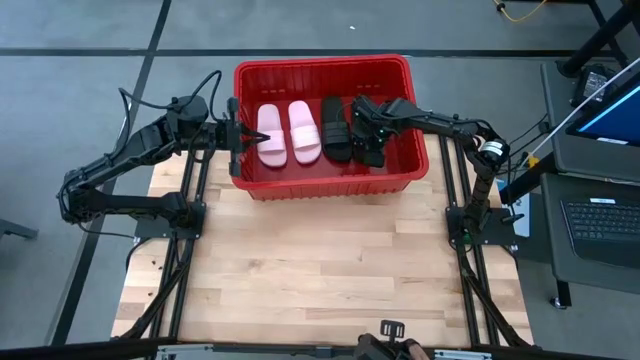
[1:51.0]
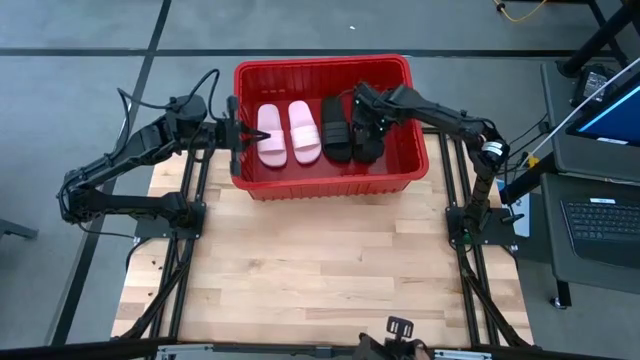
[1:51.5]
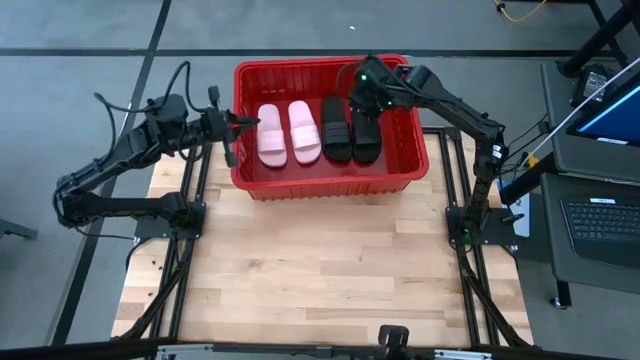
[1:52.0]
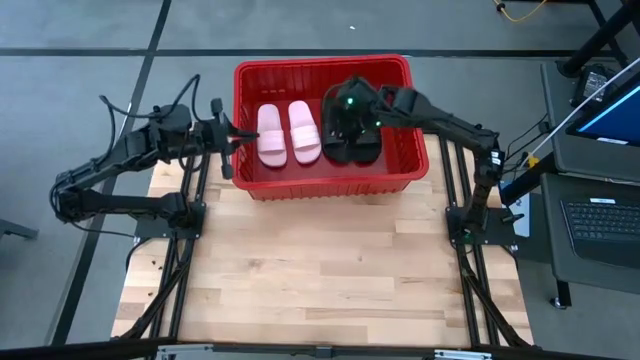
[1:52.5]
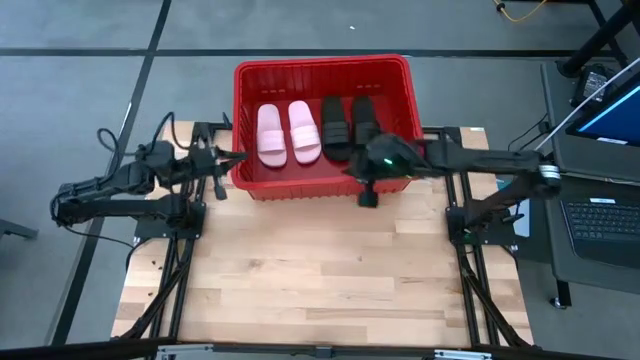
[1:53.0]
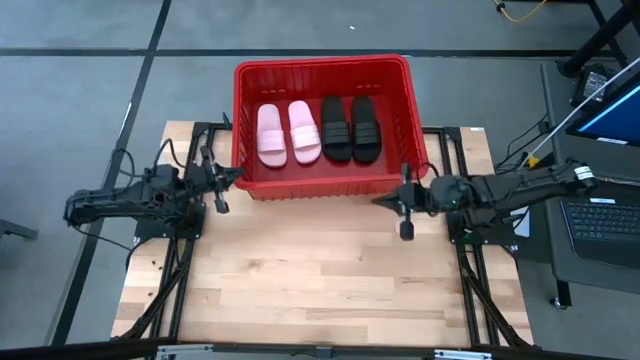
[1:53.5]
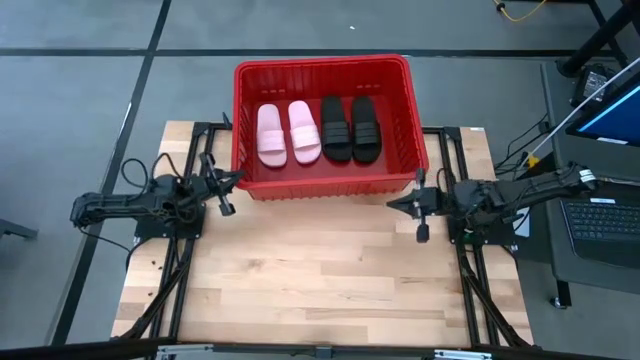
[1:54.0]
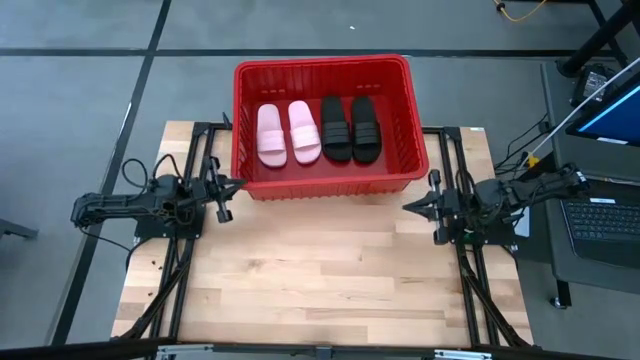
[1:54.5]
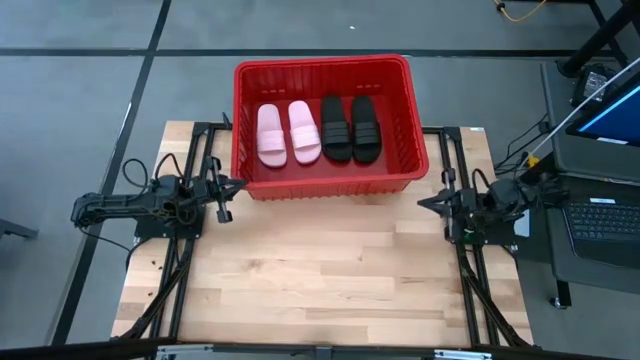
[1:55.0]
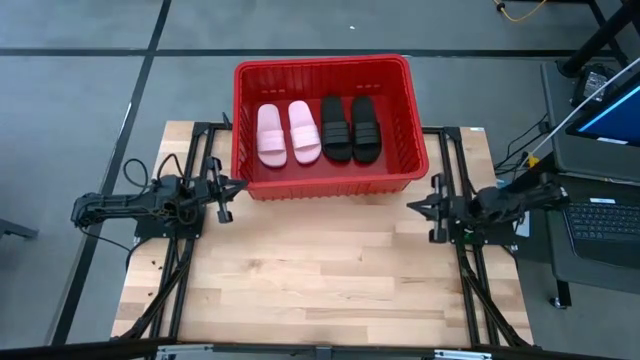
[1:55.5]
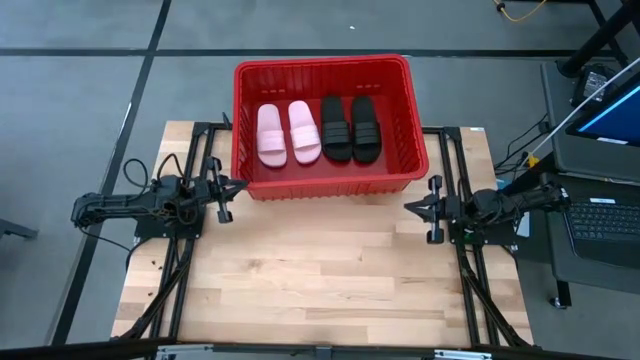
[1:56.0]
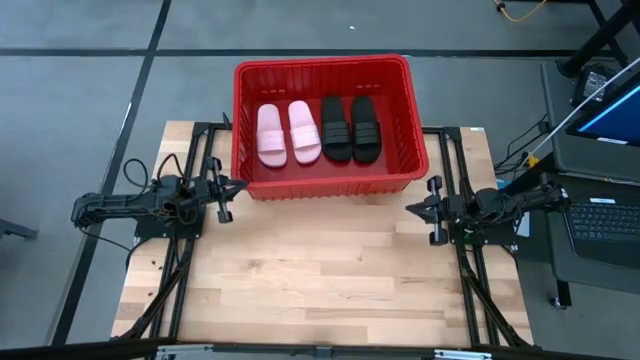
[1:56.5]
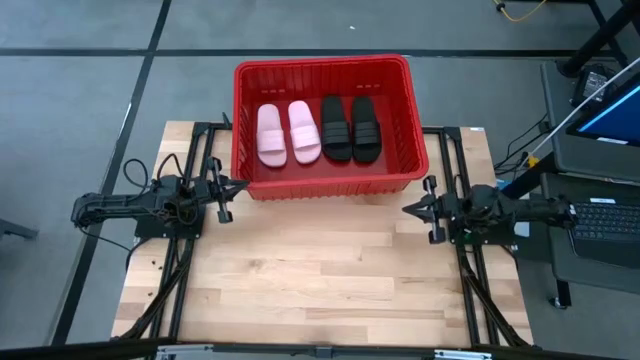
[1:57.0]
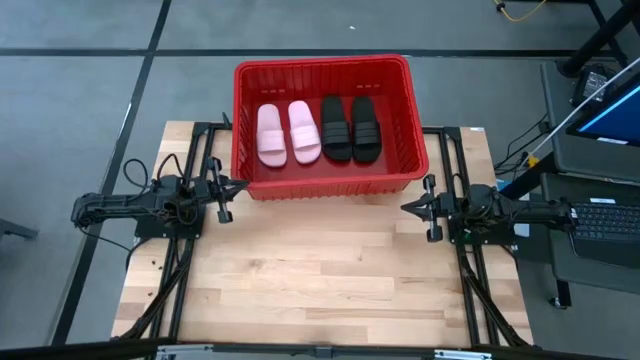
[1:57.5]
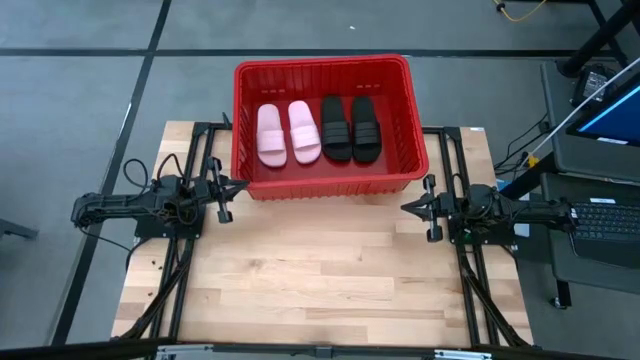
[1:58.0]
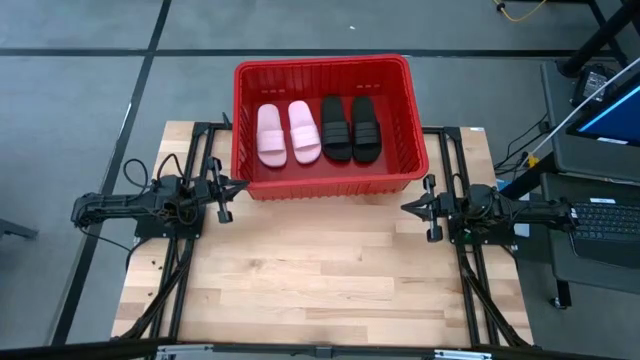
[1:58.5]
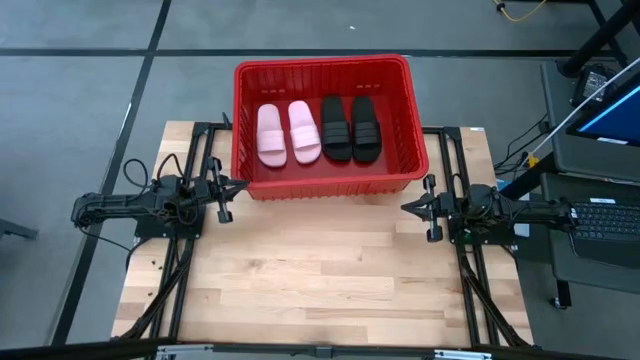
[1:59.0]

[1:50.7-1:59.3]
Task: Pick and place slides into bin
Return to Home Position

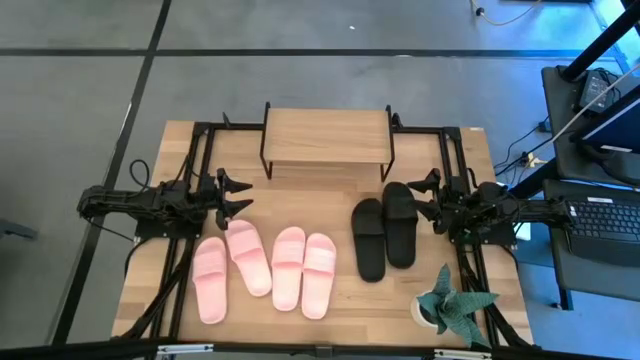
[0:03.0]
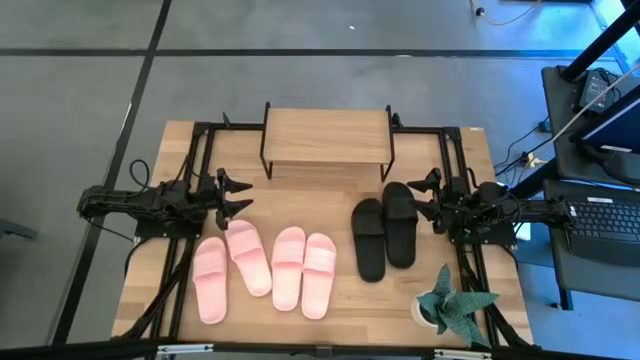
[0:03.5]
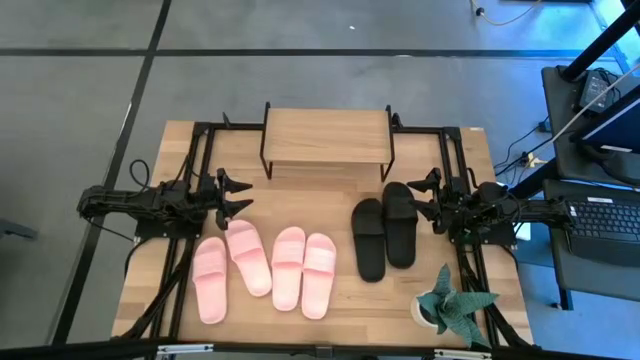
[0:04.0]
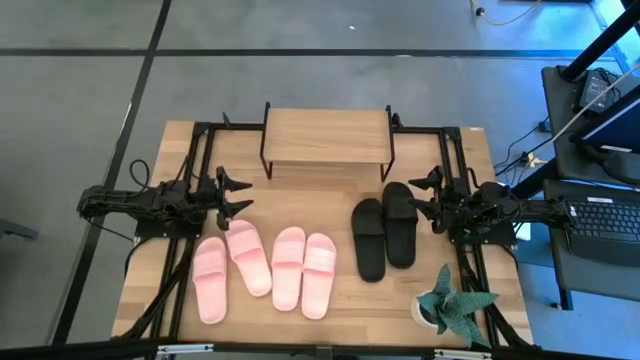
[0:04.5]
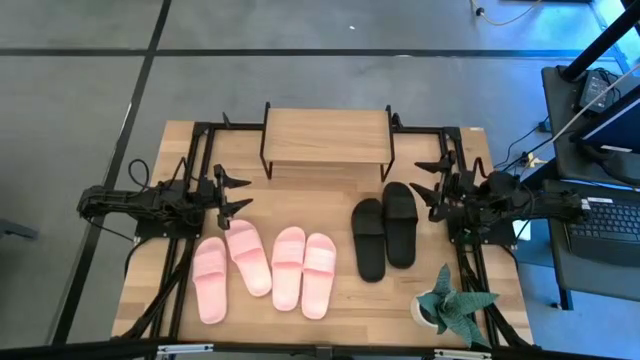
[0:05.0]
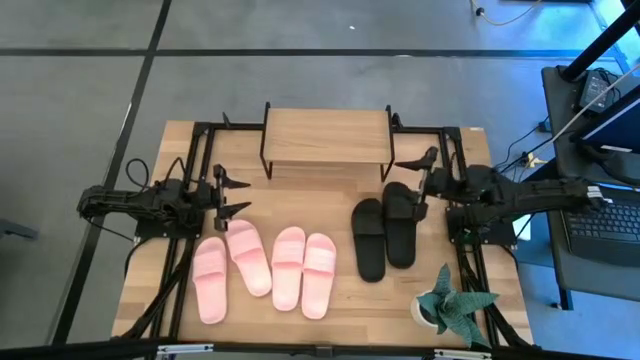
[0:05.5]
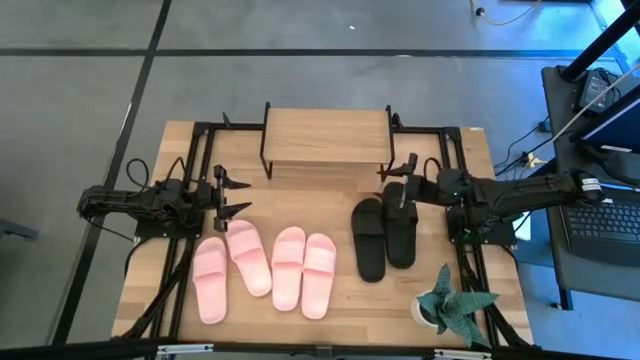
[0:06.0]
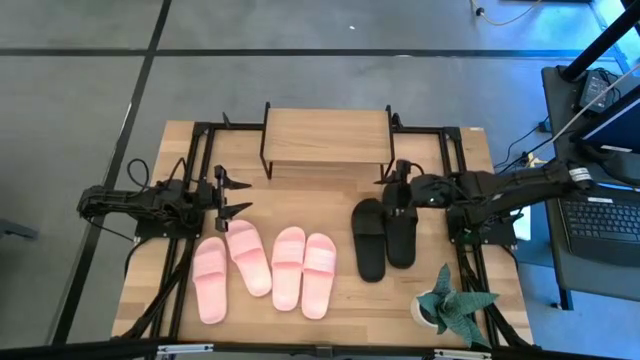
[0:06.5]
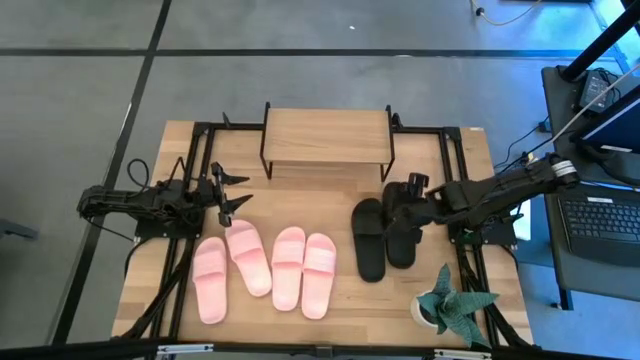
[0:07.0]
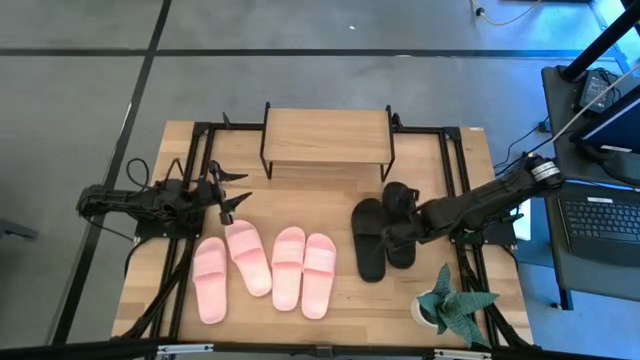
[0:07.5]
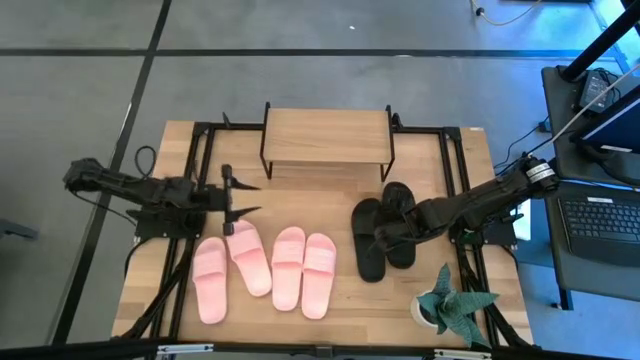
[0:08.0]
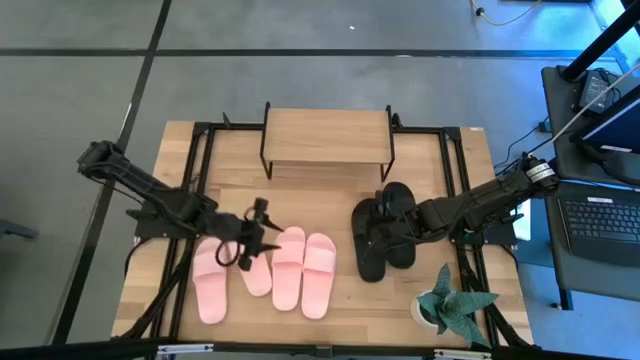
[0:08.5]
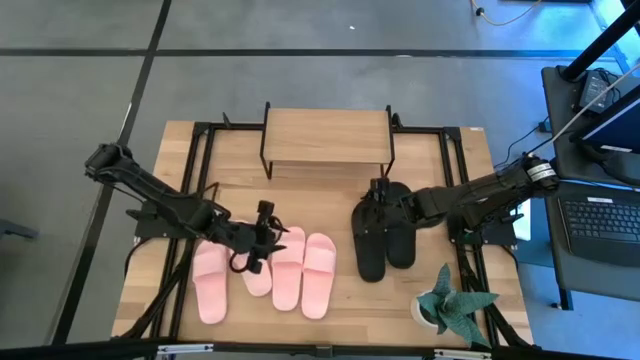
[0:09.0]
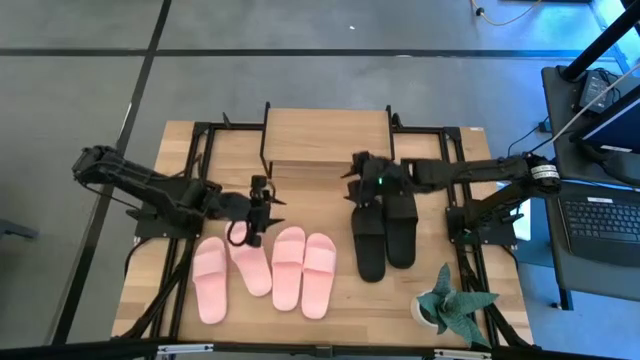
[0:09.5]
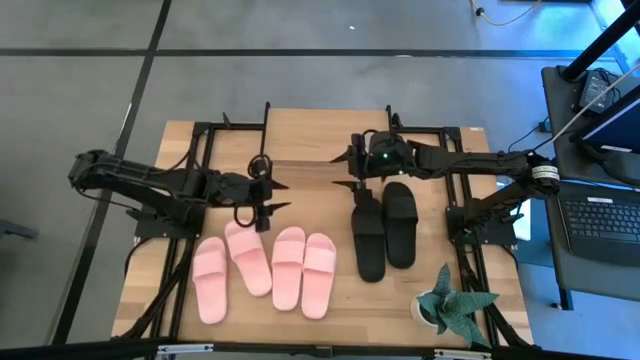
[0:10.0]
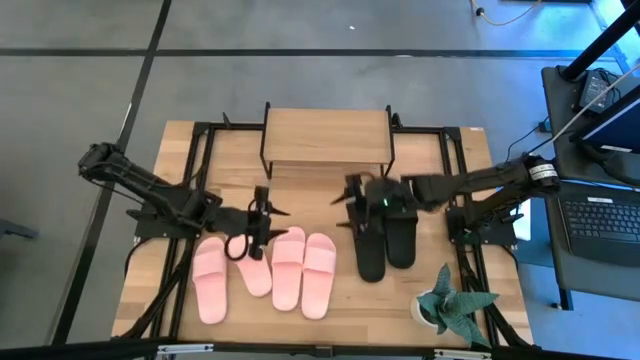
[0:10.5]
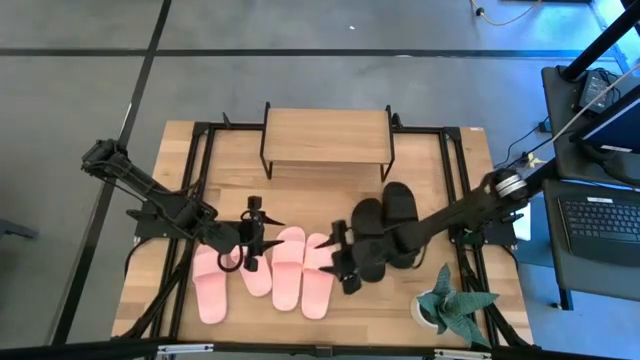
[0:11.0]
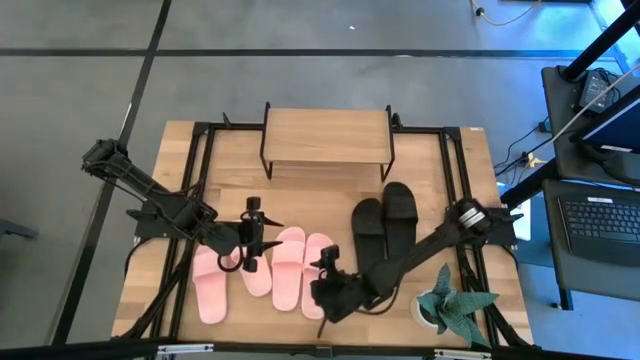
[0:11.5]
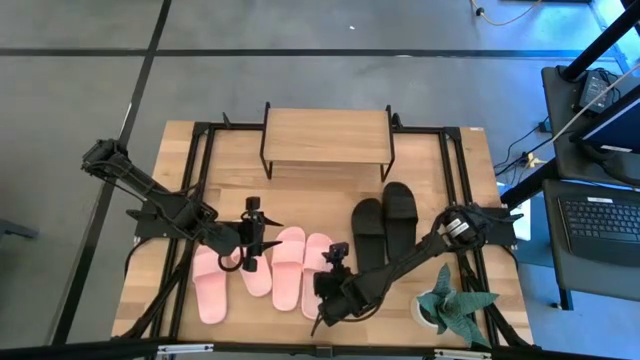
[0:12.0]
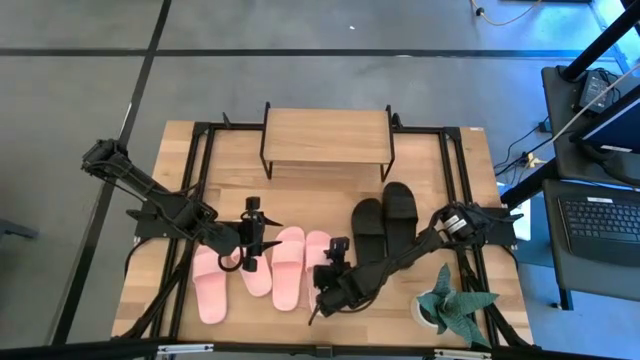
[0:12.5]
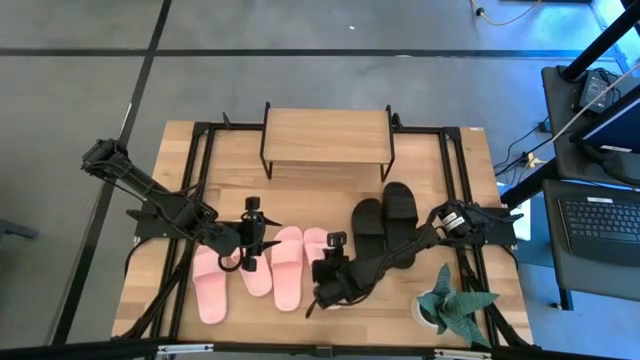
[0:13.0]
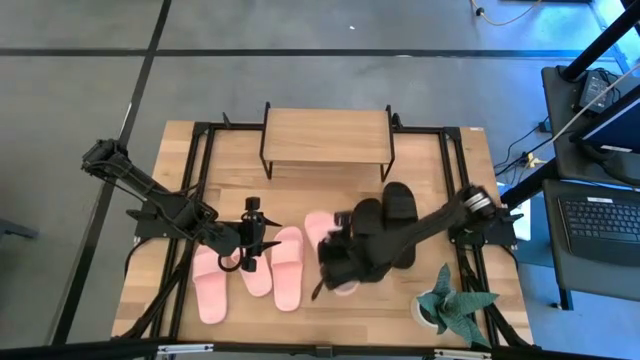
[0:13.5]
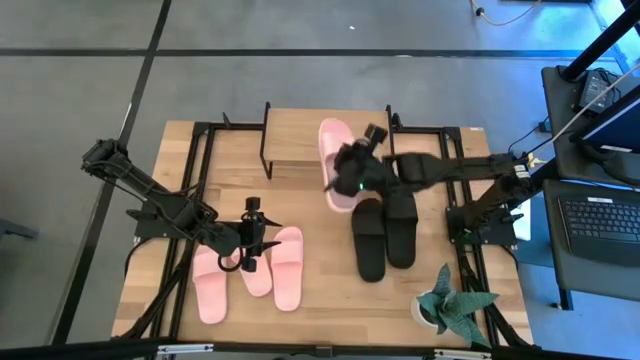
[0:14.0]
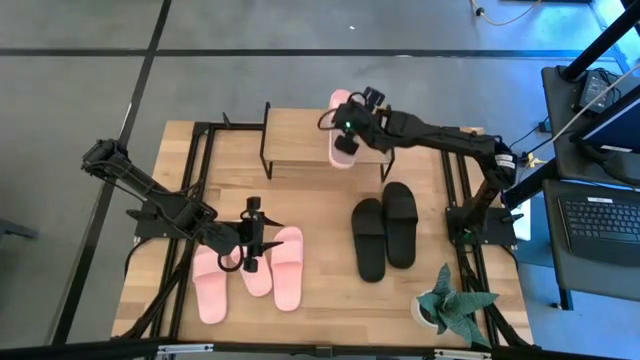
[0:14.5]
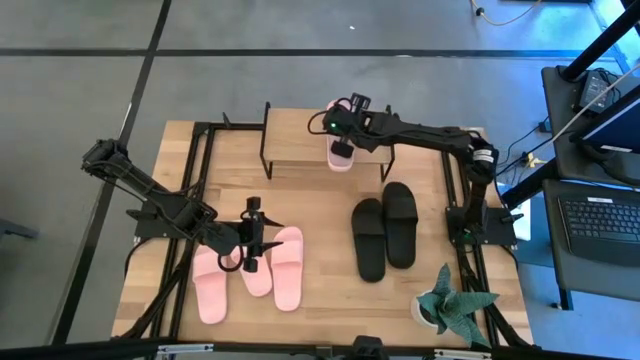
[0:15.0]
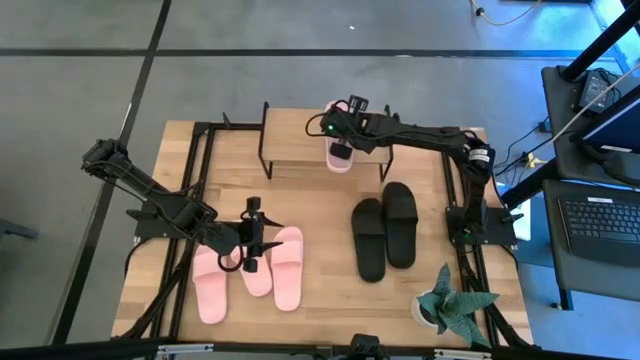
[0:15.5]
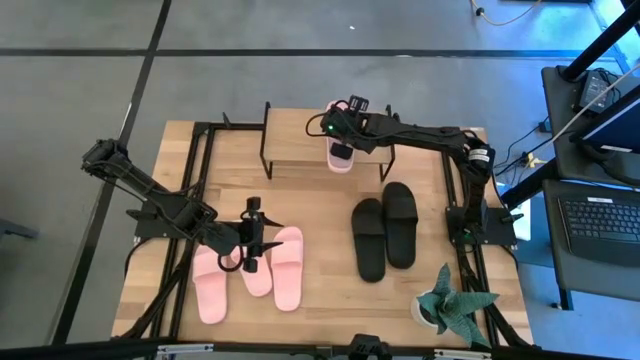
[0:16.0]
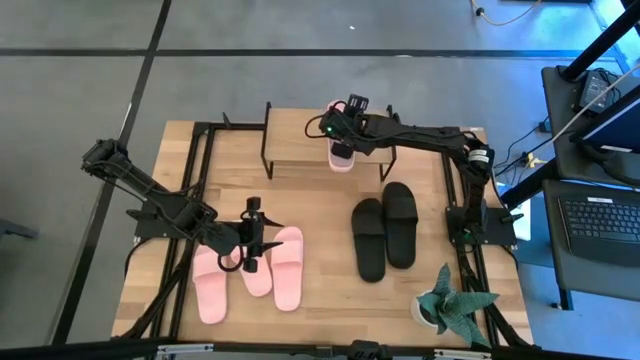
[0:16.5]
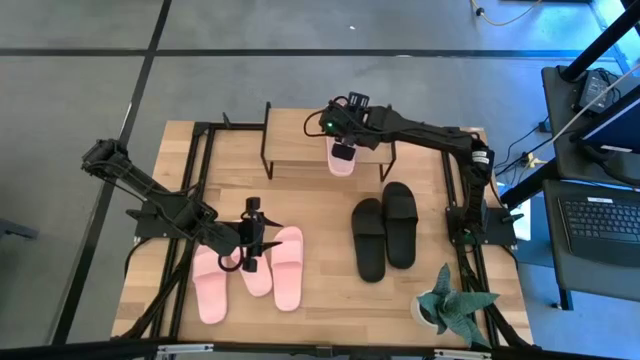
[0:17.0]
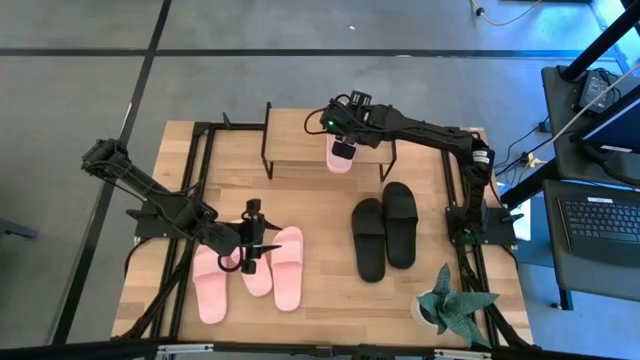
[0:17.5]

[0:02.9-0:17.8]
Task: Pick and place slides into the shelf
Put the pink slipper slide on the shelf
